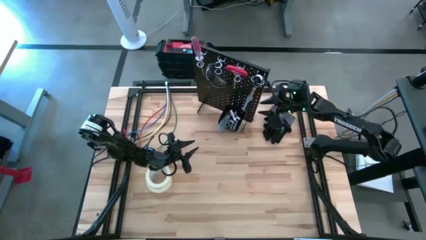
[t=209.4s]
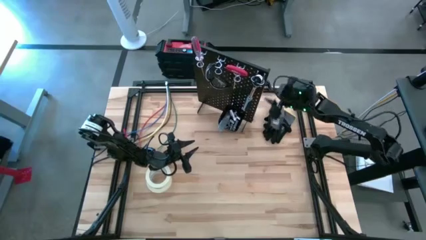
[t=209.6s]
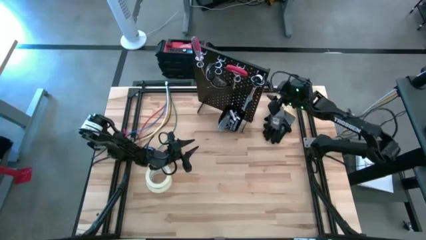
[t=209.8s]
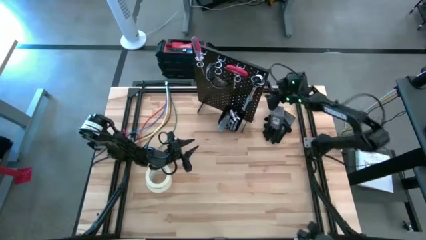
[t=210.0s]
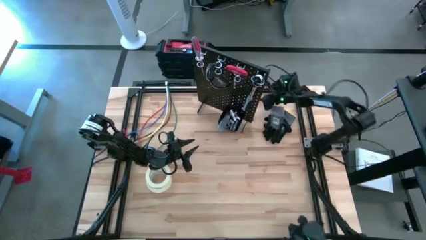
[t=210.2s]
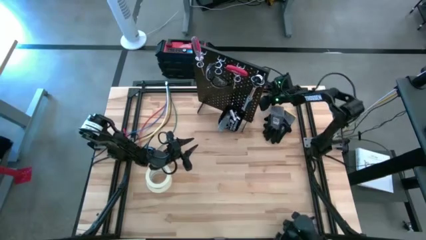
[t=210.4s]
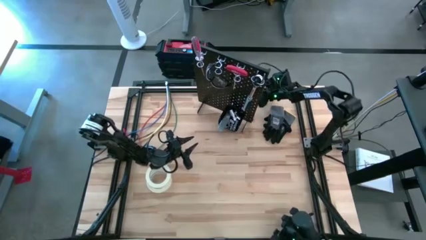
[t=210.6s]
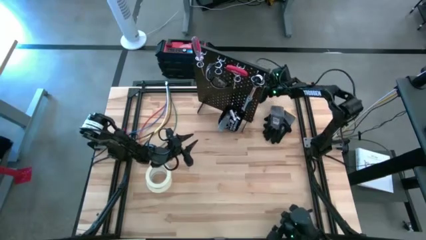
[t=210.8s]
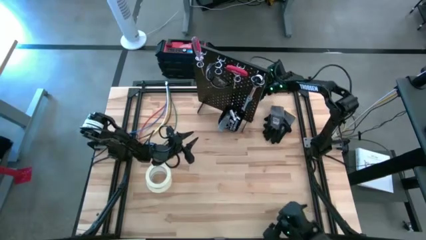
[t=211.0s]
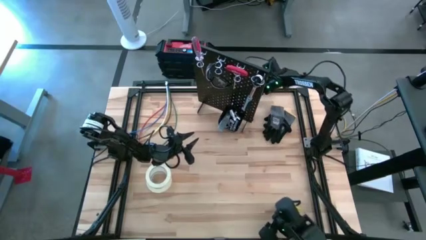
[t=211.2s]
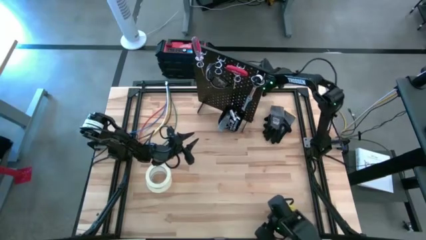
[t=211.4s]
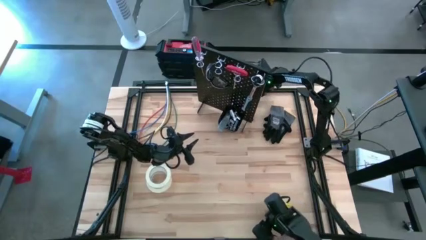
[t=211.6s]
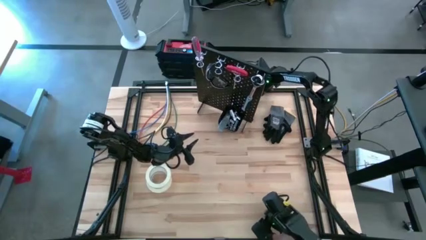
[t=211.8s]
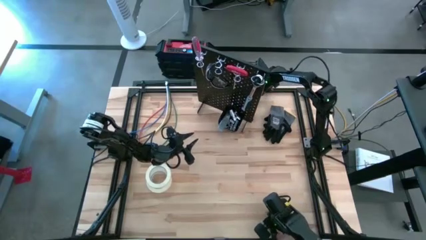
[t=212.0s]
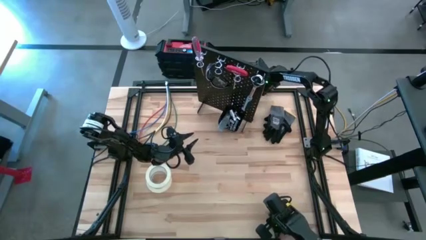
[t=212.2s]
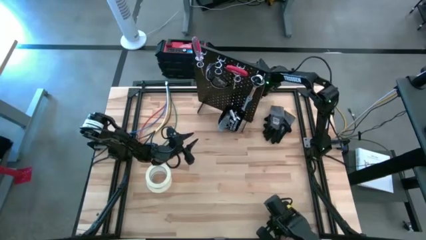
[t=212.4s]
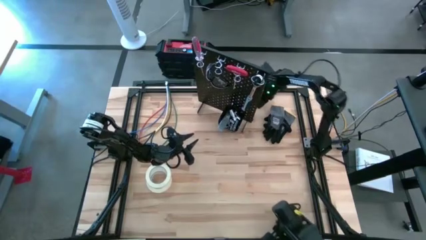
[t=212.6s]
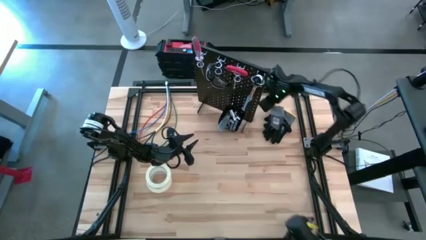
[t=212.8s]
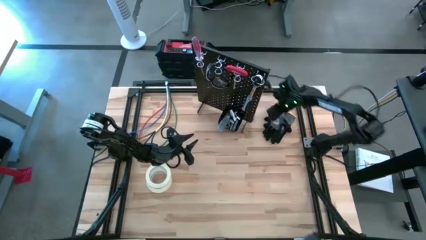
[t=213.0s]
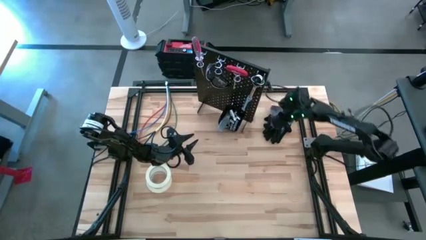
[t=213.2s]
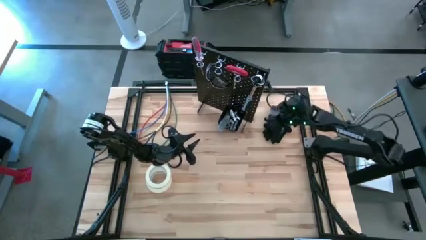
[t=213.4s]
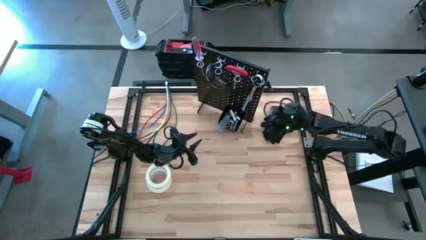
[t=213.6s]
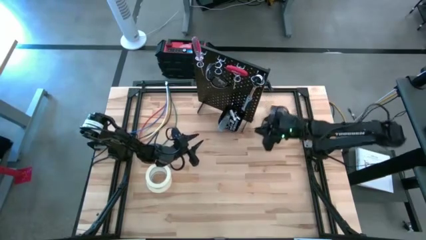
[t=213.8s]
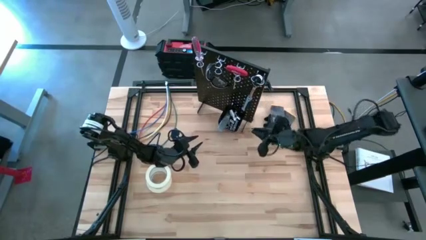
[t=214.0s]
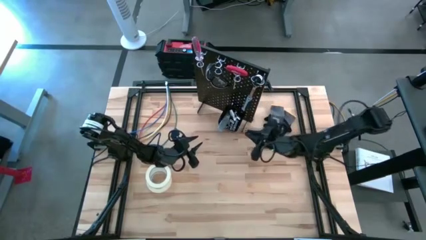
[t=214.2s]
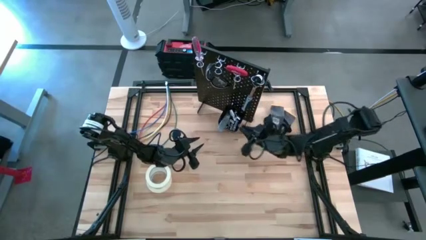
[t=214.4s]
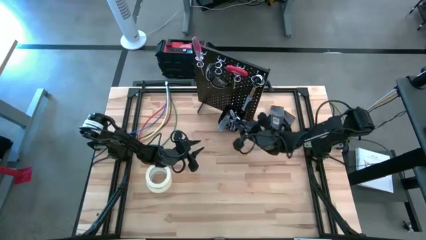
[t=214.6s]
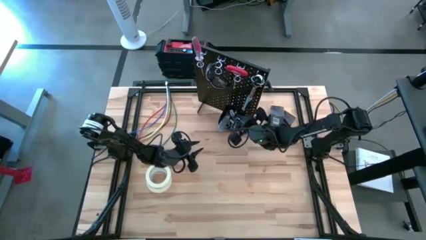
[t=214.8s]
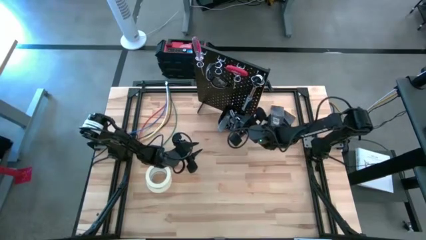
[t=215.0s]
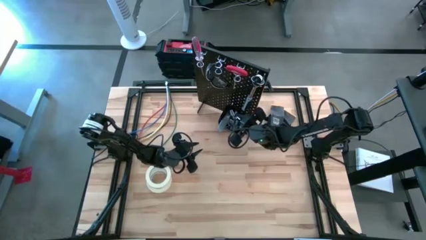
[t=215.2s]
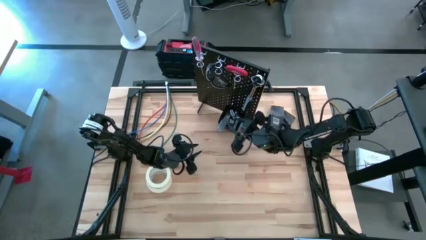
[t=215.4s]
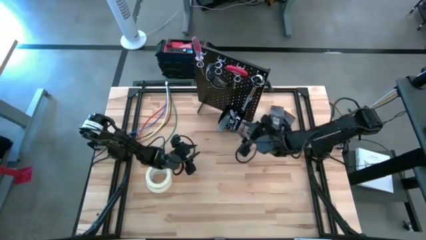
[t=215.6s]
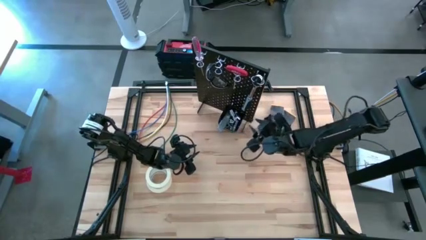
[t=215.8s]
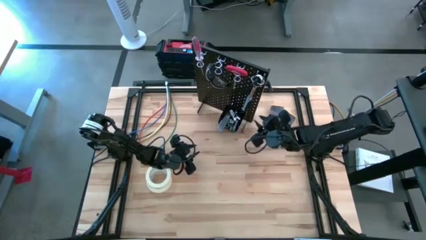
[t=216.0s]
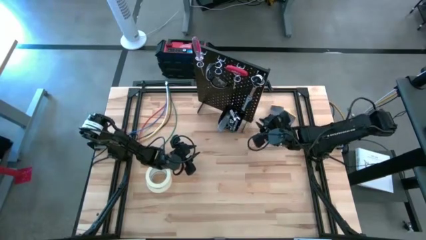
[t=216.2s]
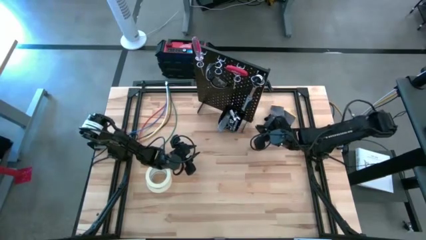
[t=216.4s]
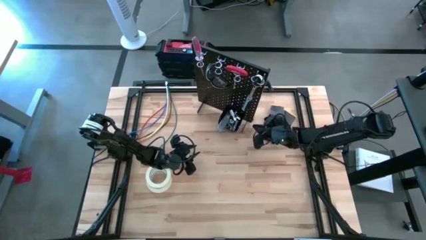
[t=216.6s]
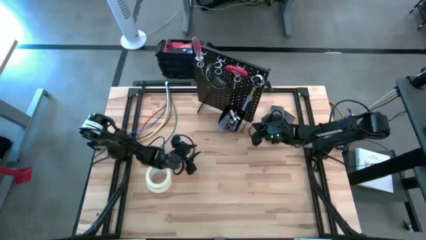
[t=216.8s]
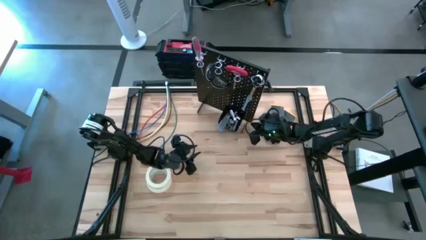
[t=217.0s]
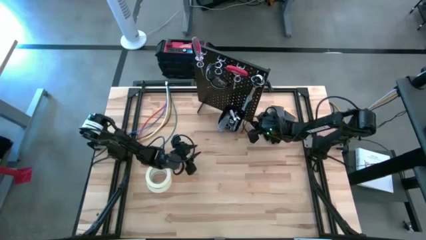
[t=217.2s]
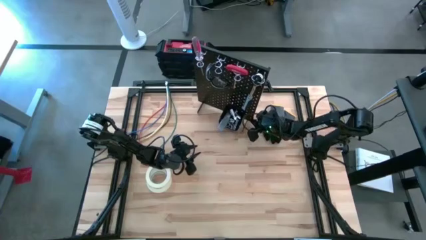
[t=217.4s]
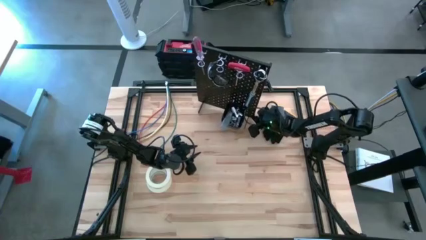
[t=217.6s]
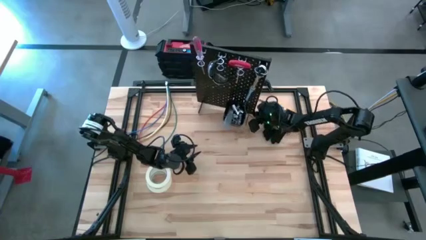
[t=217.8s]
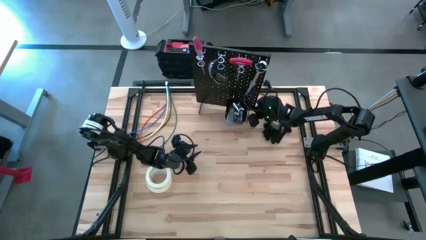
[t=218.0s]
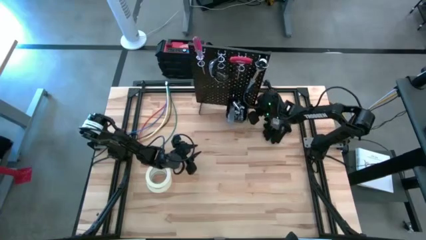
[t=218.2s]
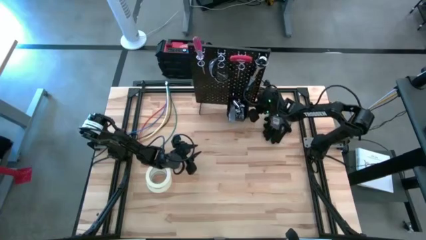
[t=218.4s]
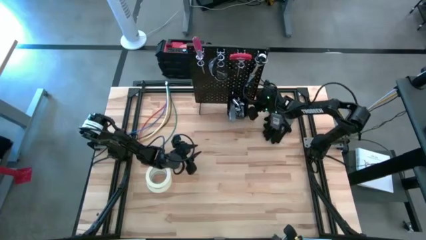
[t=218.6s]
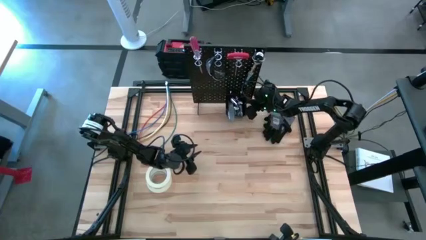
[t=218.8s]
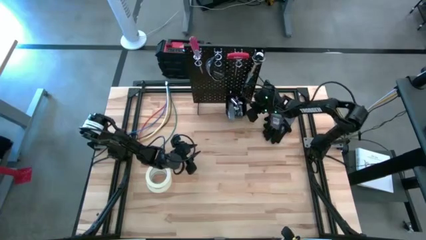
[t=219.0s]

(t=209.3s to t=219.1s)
Task: Hang tools onto peg board
Put the socket into the black bin on the peg board

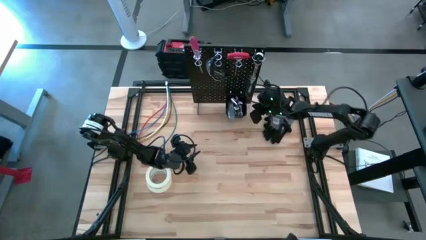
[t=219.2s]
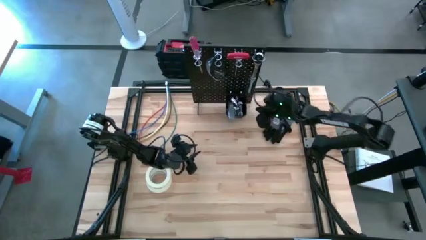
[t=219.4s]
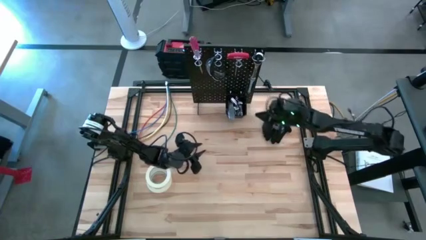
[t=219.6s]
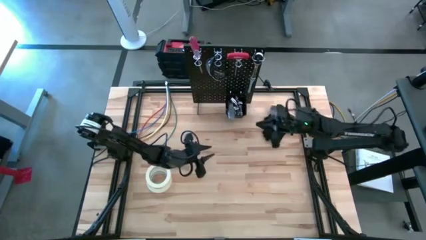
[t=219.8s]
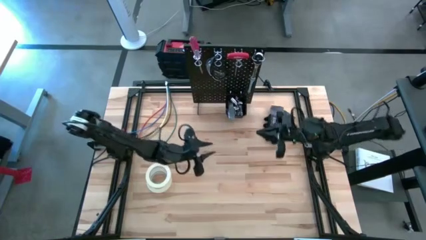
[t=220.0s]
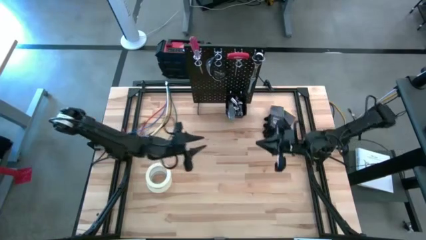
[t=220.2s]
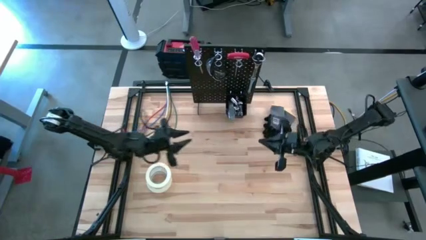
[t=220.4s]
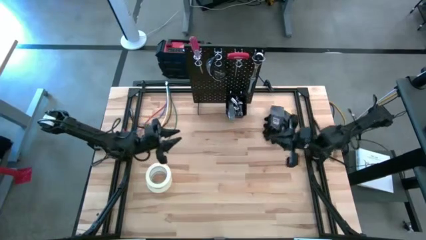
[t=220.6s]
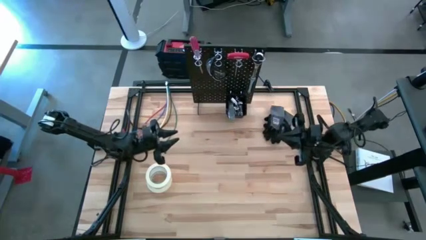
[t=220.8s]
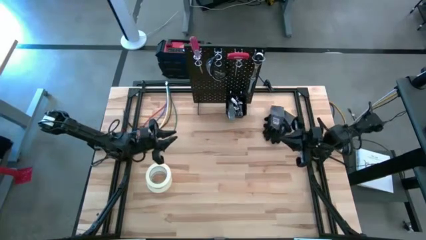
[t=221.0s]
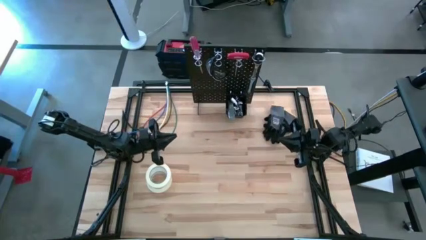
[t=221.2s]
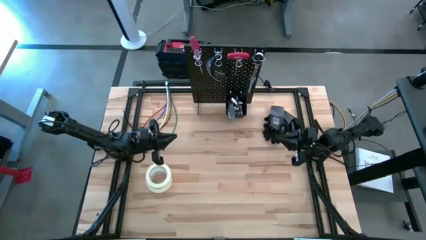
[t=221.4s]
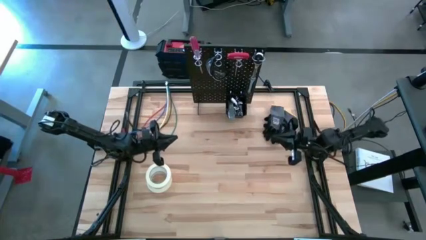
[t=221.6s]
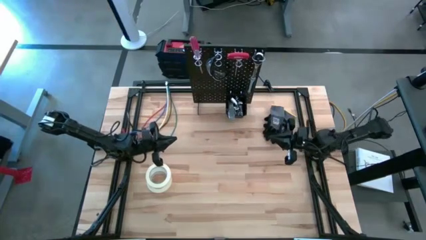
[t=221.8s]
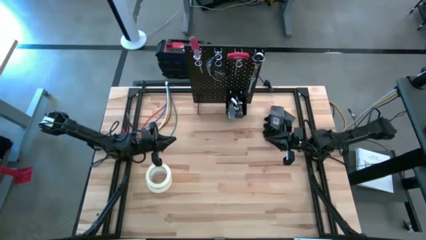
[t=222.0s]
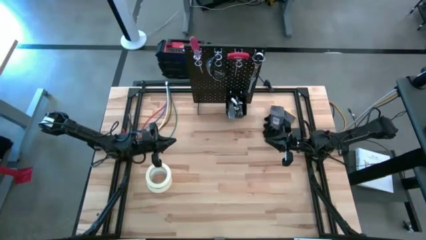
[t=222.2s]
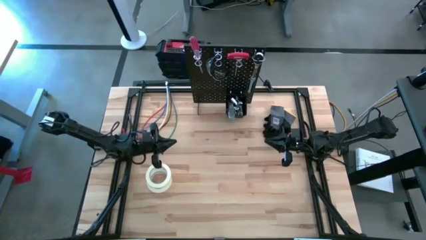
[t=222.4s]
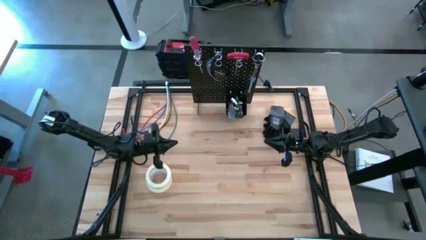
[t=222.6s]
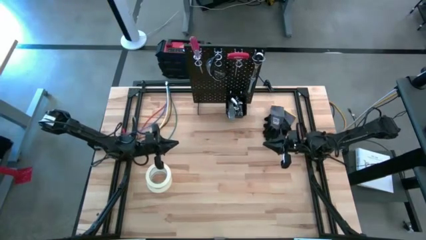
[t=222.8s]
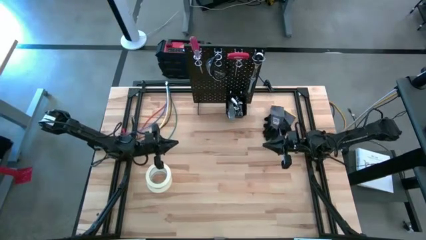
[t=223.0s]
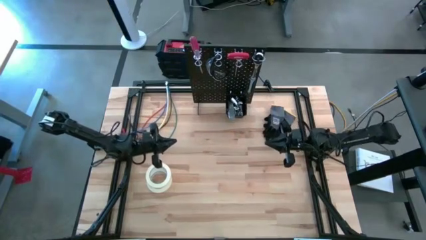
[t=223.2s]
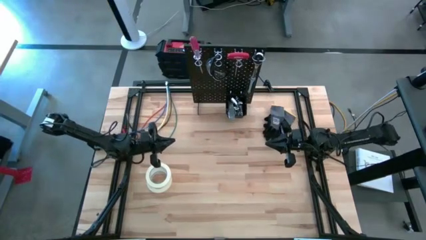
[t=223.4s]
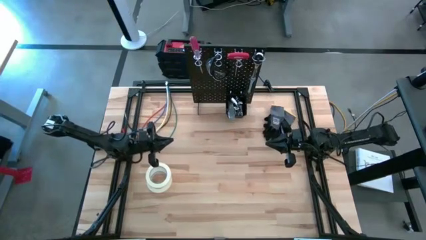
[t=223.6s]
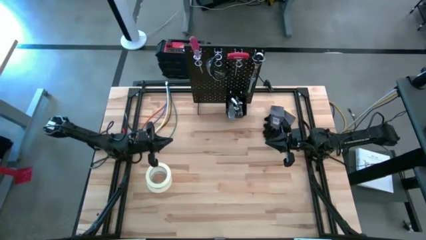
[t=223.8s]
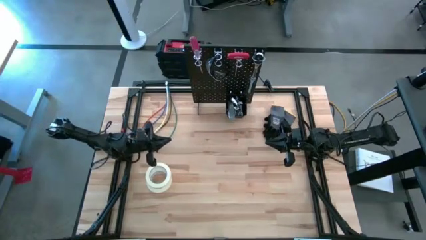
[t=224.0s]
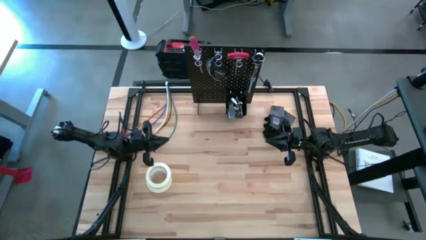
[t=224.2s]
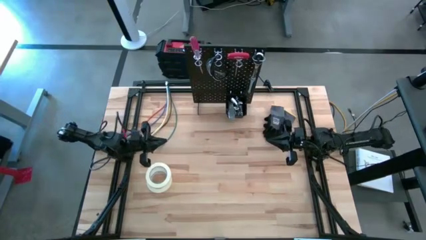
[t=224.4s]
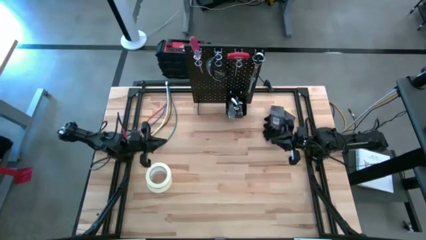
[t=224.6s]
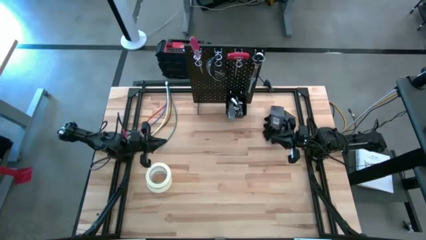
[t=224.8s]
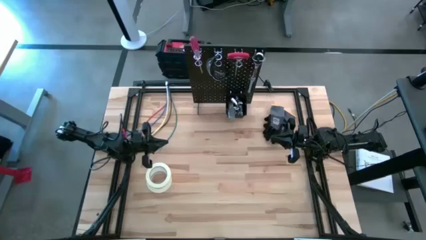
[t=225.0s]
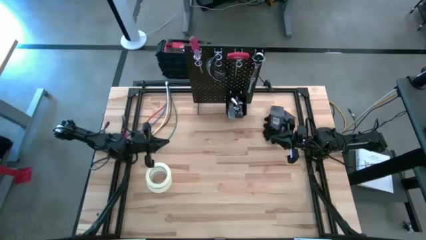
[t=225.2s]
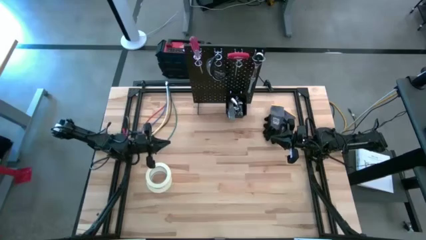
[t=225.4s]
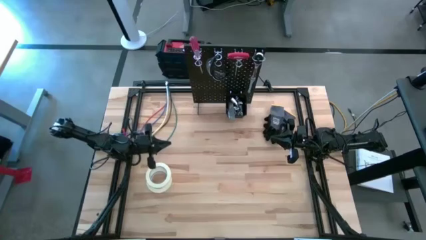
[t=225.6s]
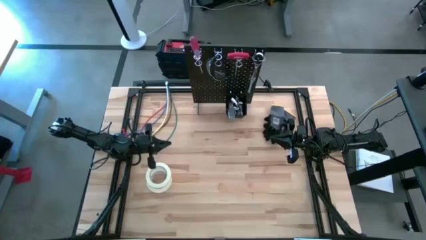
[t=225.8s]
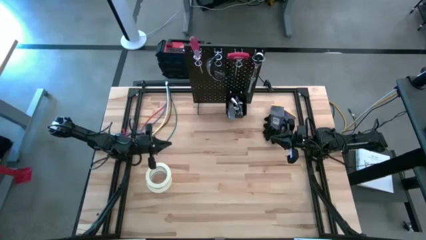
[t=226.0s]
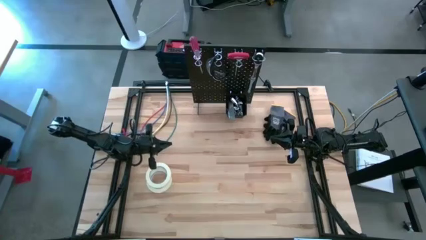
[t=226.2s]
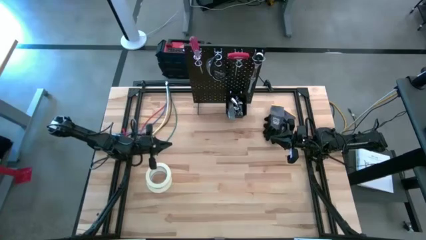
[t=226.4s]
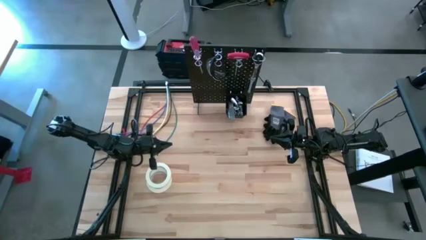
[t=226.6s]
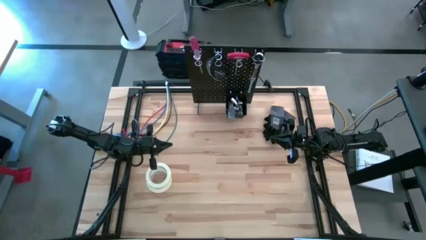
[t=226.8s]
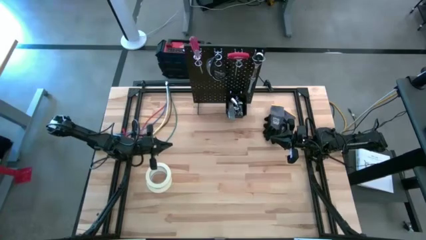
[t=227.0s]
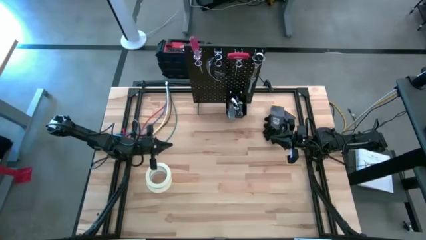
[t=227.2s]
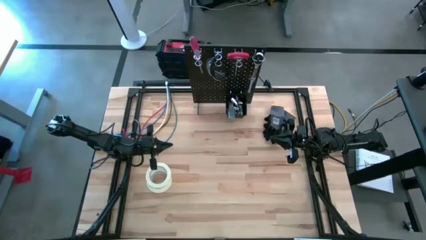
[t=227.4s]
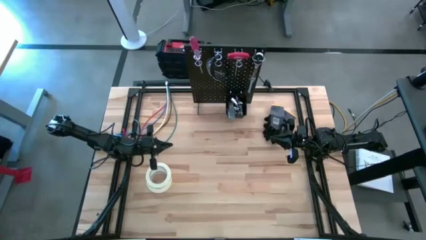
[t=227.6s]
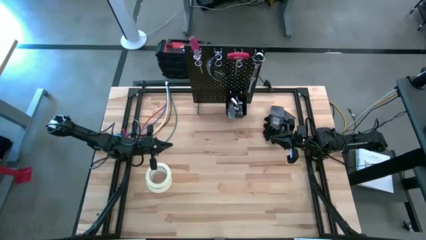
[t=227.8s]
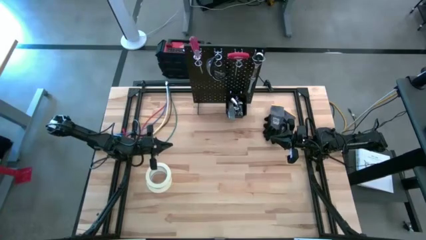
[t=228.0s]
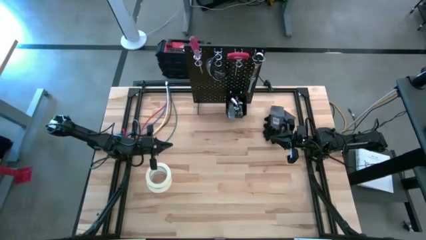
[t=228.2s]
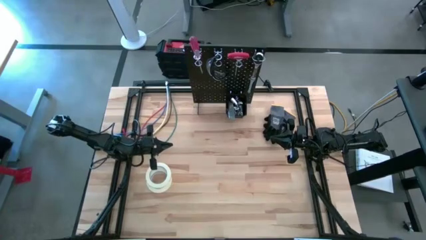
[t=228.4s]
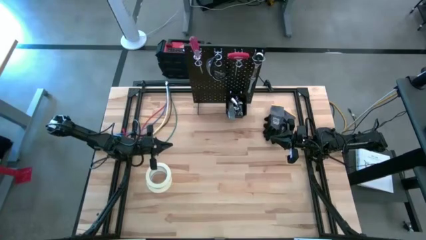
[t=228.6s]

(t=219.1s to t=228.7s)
Return to Home Position
